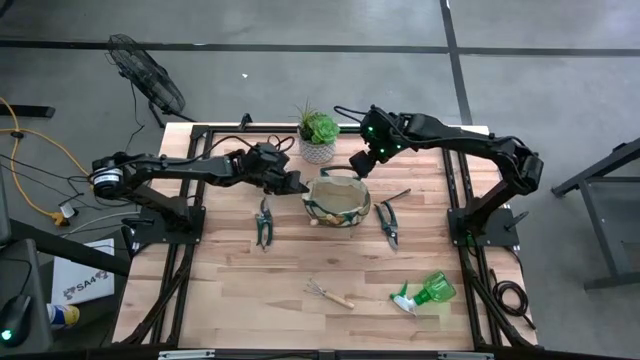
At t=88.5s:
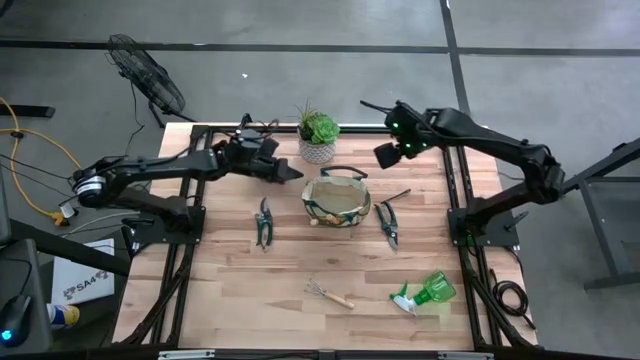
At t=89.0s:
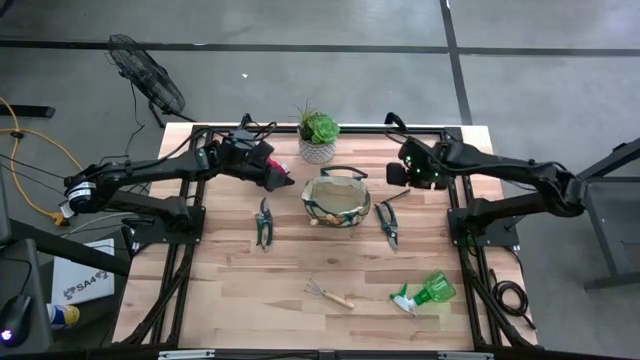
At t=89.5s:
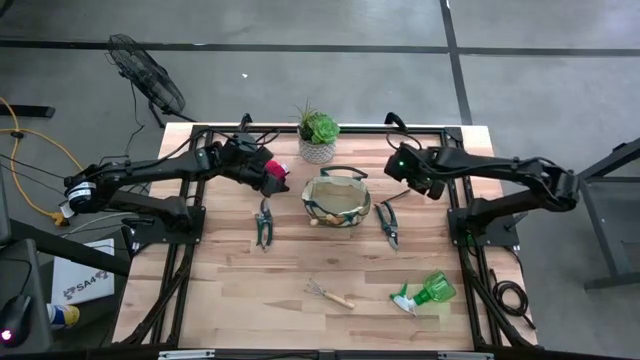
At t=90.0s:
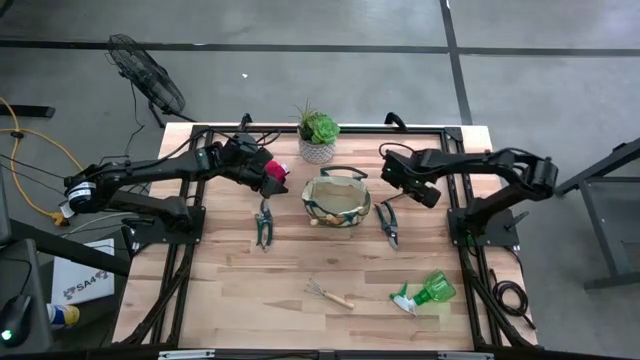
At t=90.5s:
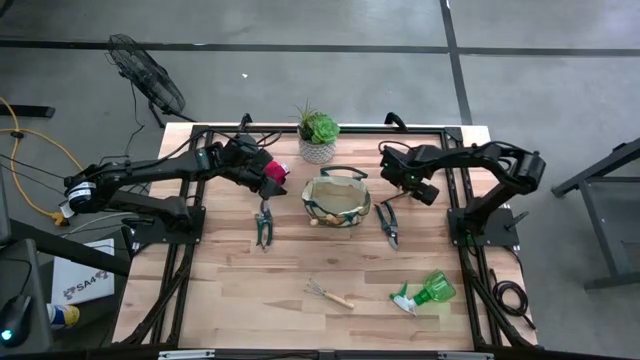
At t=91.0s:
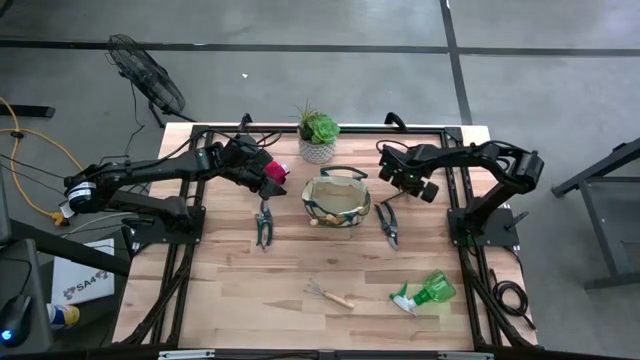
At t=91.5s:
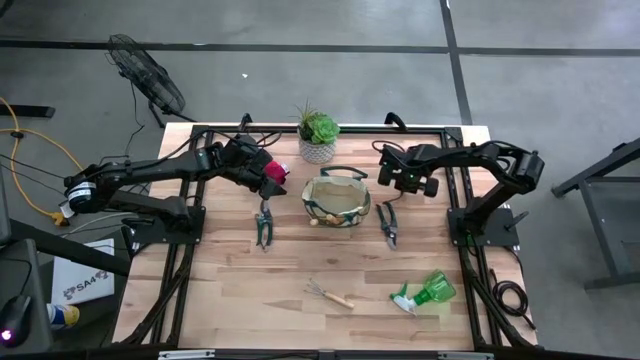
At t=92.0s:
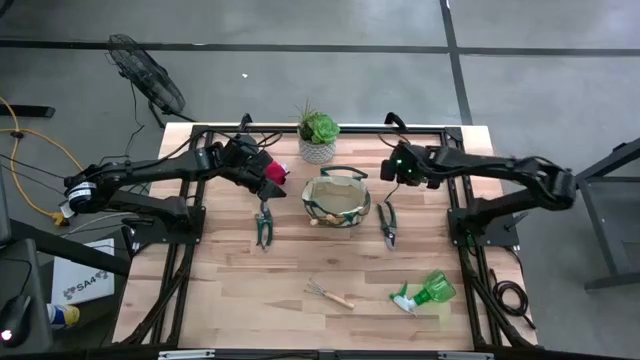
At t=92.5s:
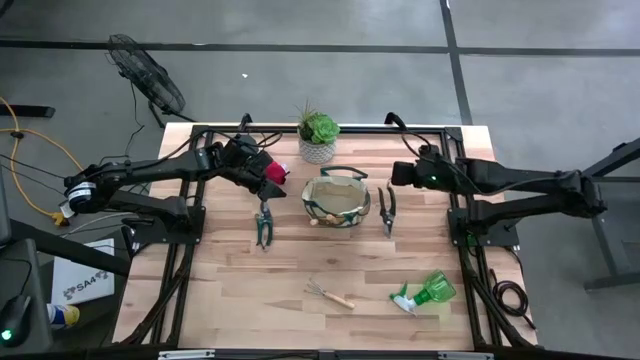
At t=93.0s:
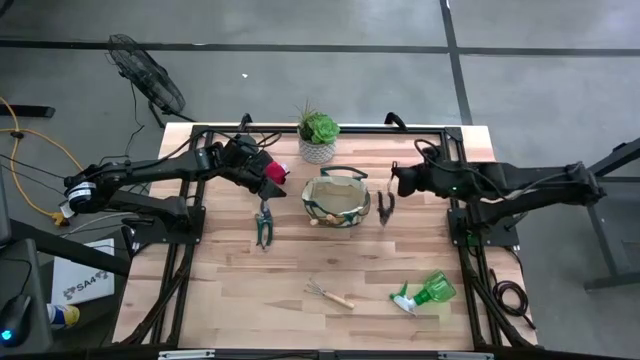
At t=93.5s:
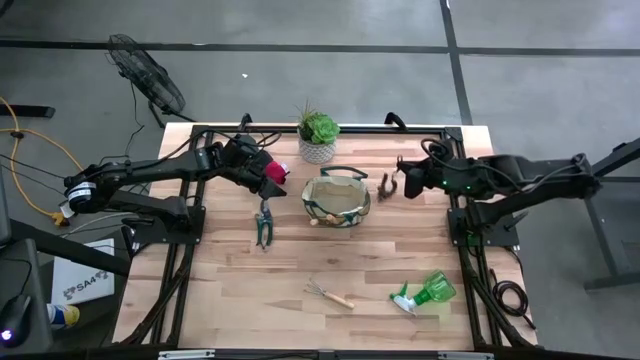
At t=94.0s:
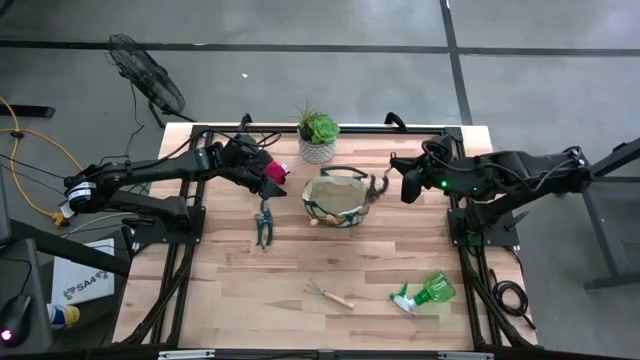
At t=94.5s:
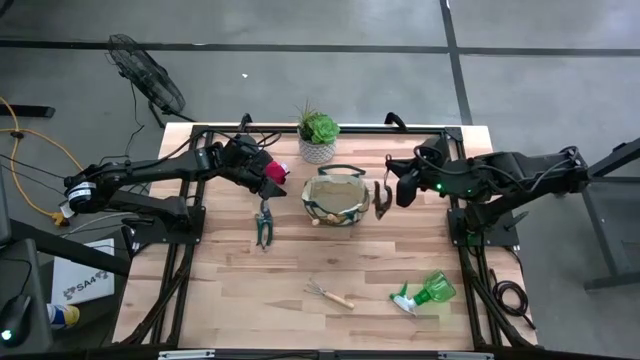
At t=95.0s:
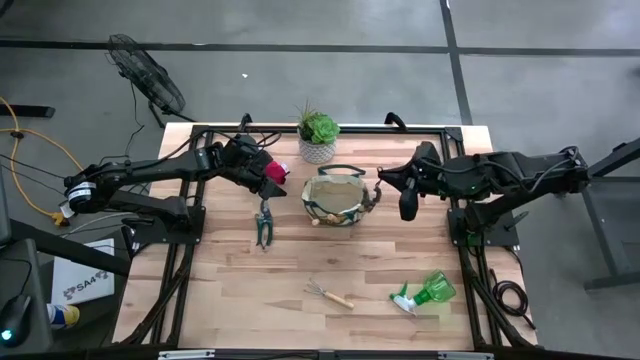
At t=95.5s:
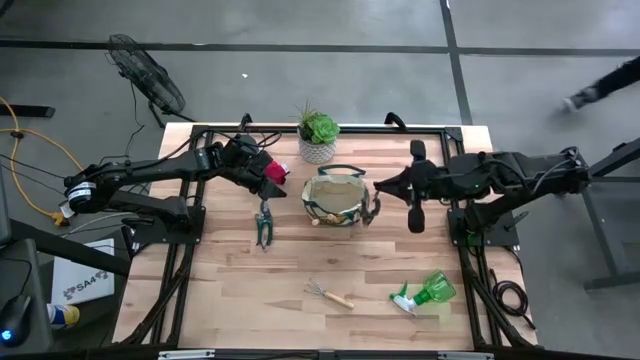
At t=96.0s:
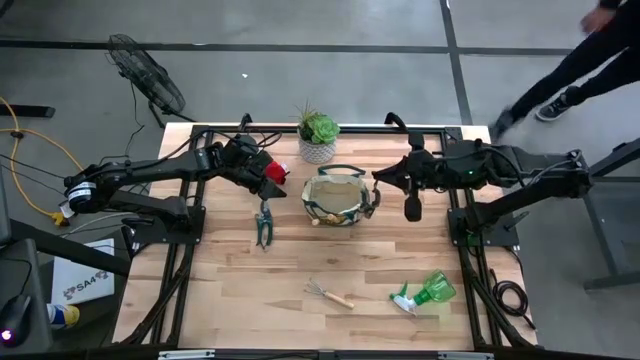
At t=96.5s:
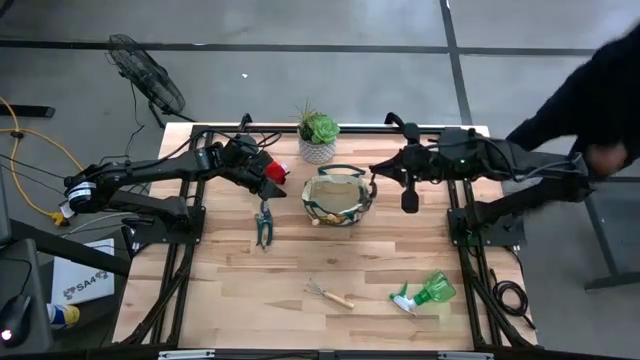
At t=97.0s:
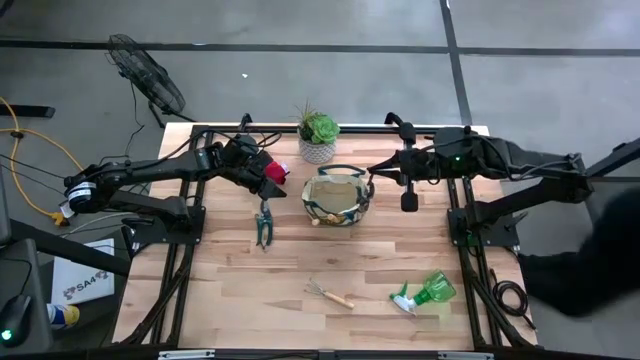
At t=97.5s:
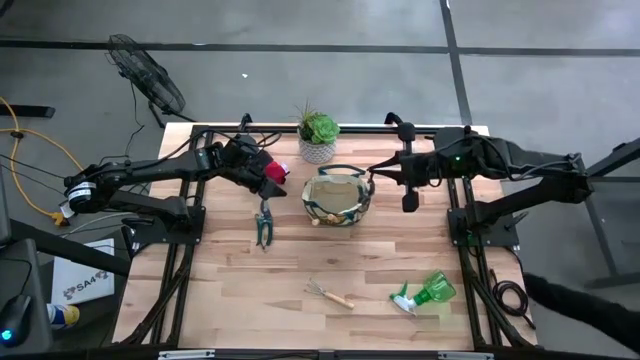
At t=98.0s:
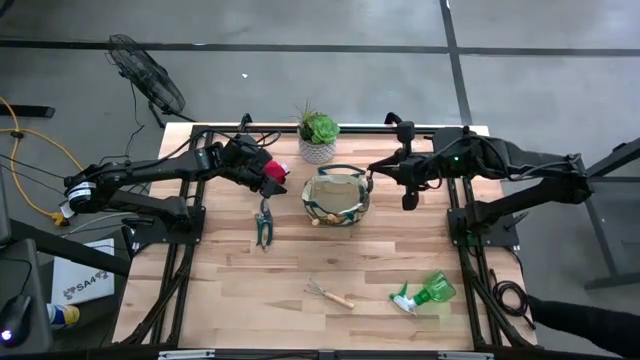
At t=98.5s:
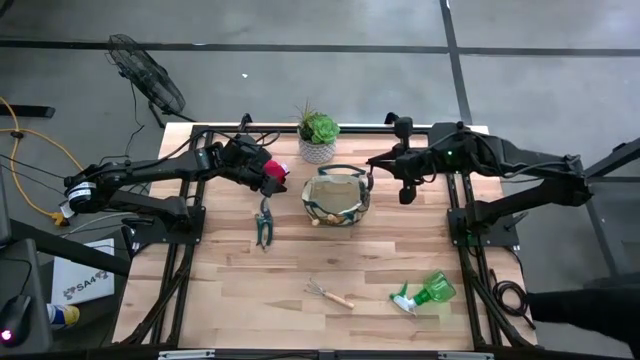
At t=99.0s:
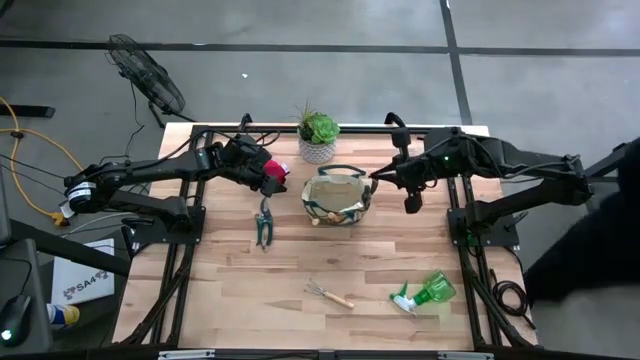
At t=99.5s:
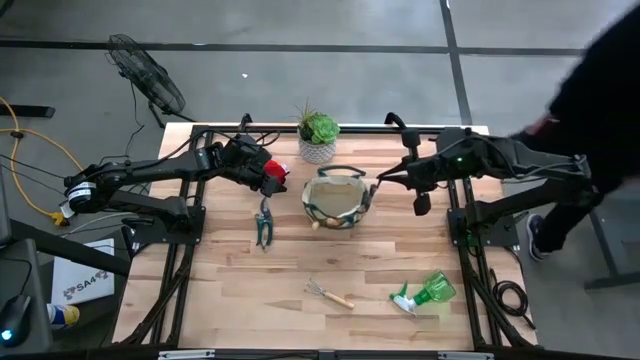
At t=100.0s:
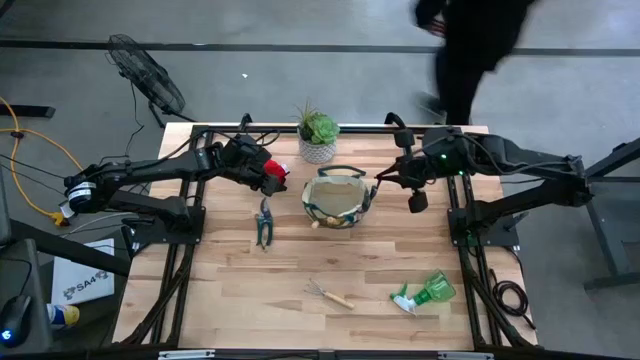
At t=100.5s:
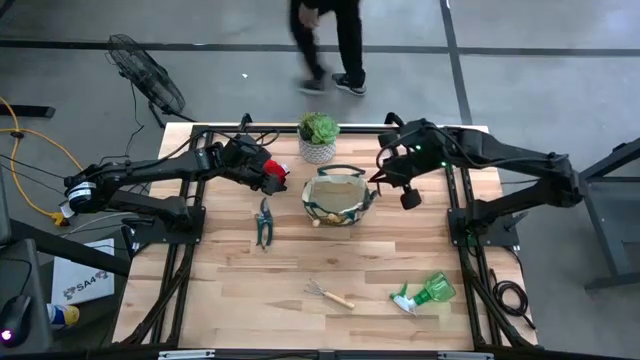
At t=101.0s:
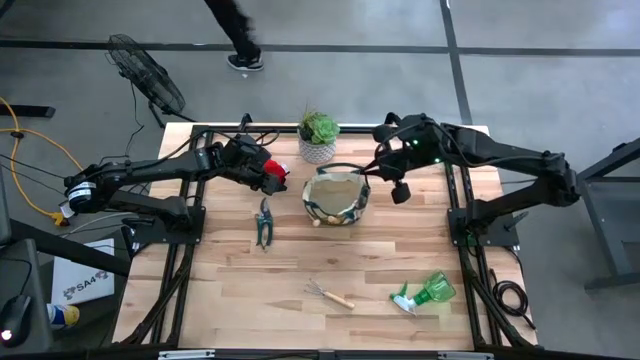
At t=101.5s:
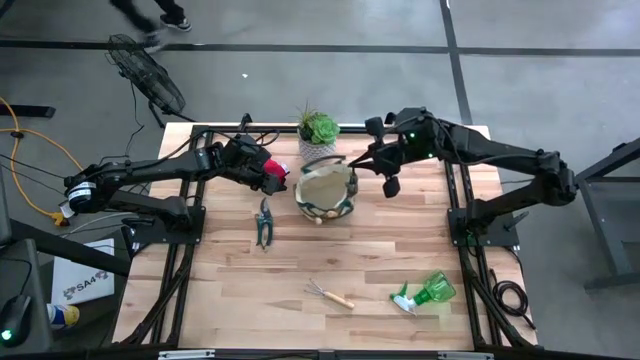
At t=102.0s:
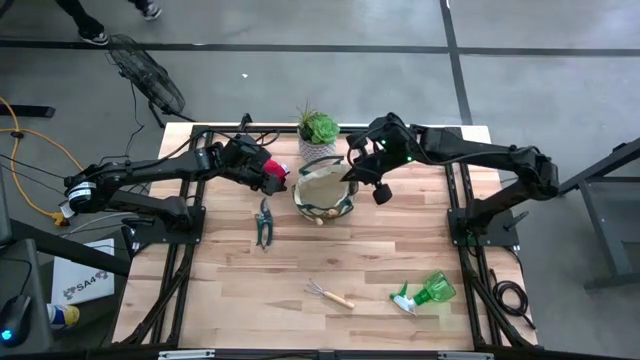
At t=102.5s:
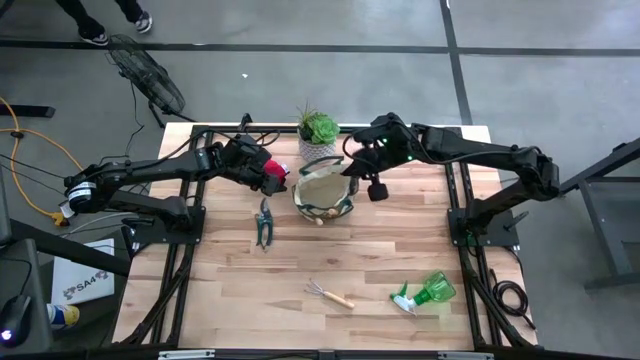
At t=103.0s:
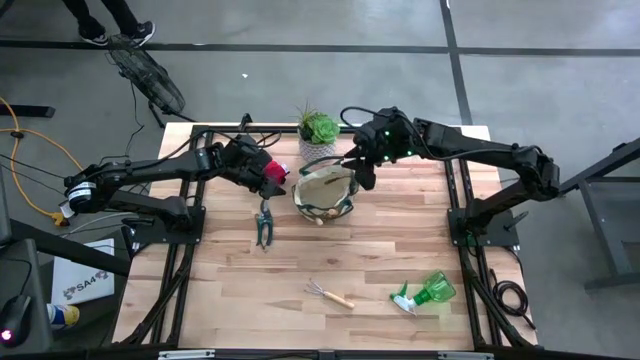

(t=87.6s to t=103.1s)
Task: Pick & Place Garden tools in Gardening bag
Put the bottom green shear scissor into the gardening bag

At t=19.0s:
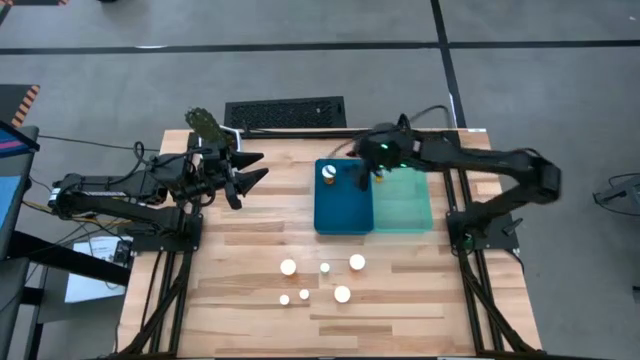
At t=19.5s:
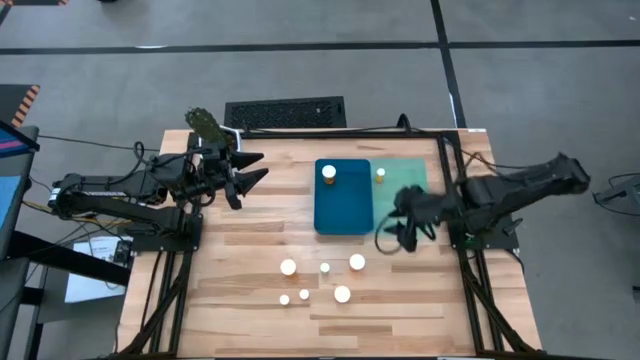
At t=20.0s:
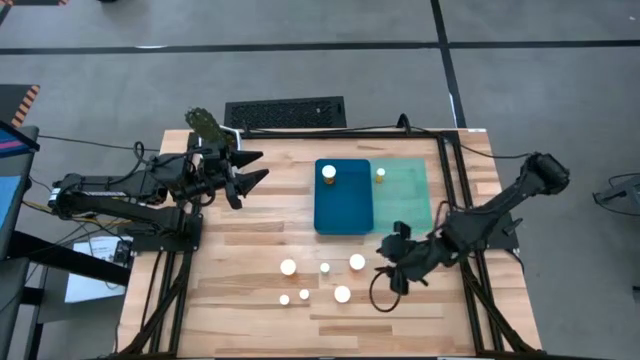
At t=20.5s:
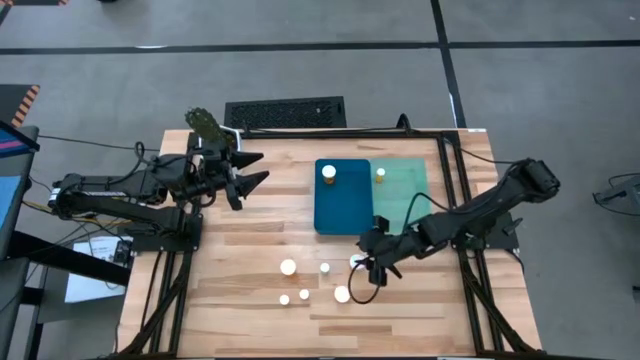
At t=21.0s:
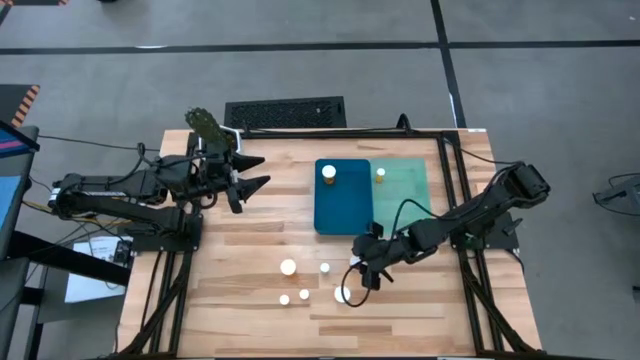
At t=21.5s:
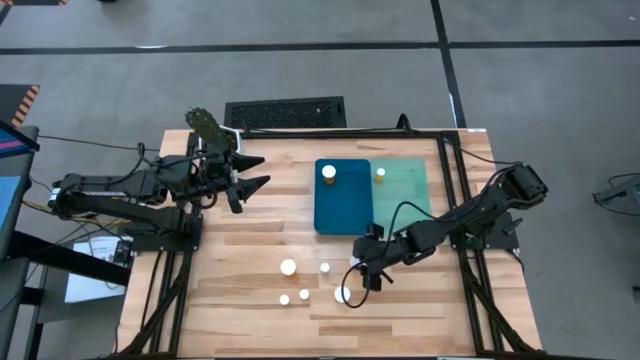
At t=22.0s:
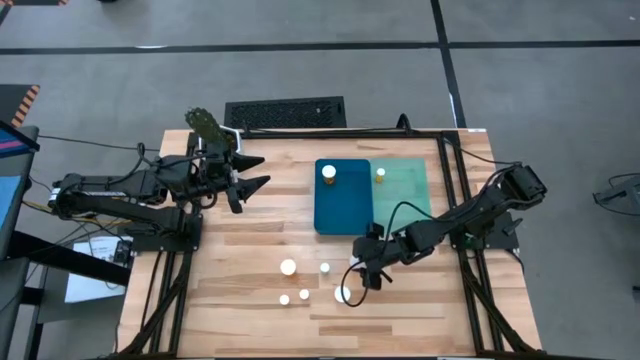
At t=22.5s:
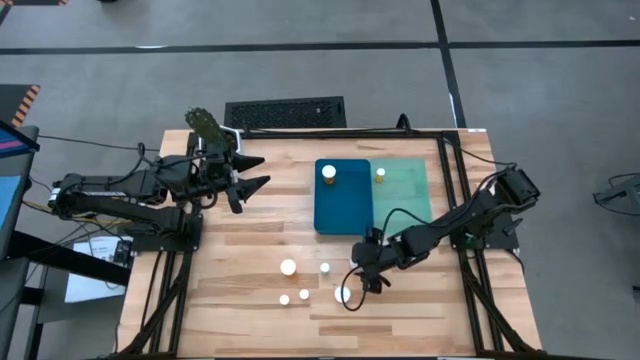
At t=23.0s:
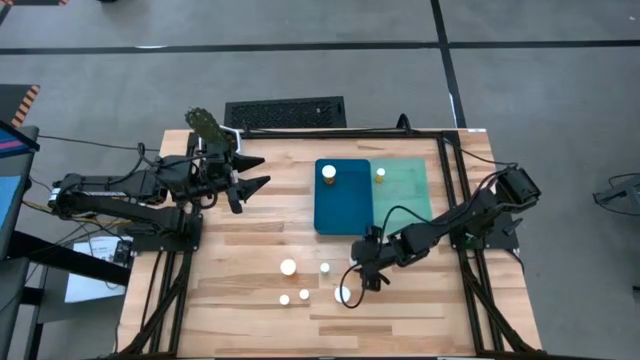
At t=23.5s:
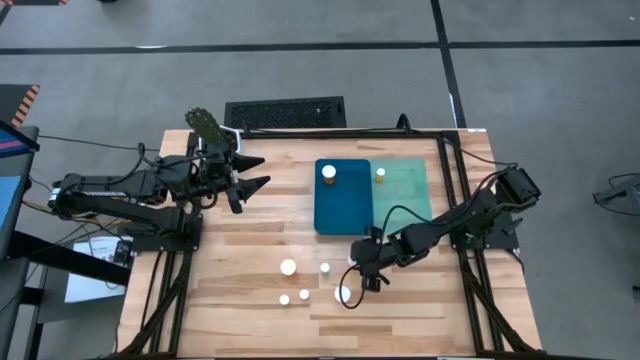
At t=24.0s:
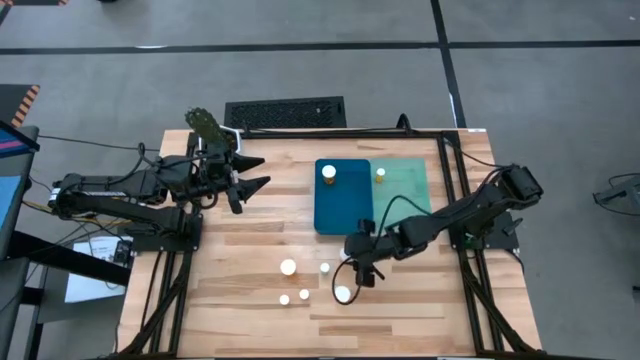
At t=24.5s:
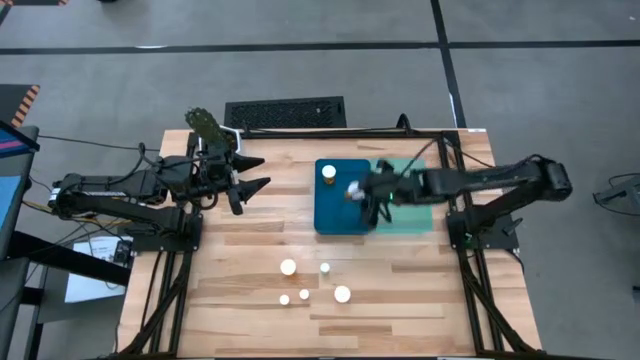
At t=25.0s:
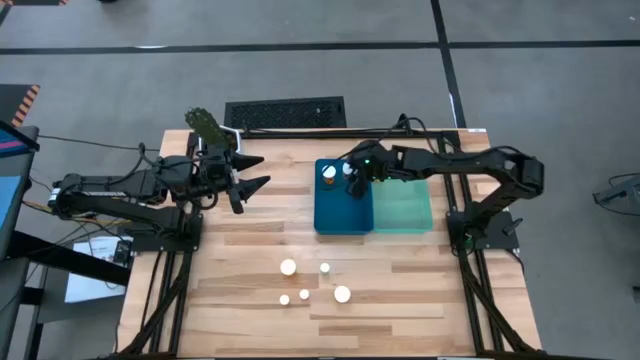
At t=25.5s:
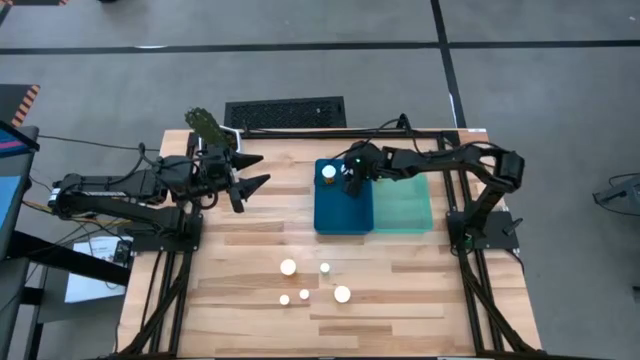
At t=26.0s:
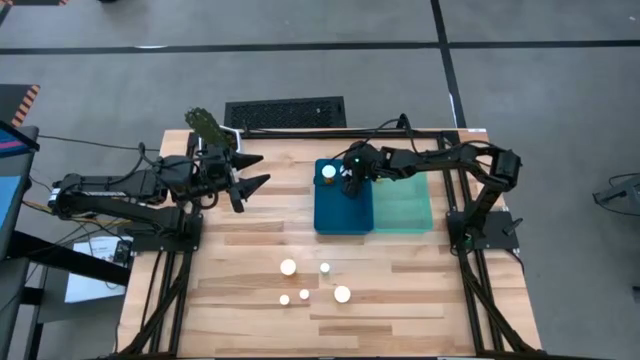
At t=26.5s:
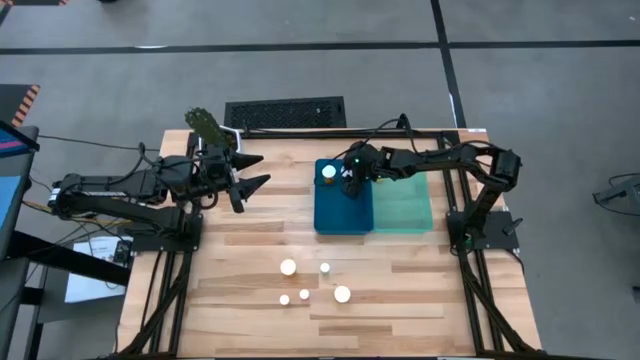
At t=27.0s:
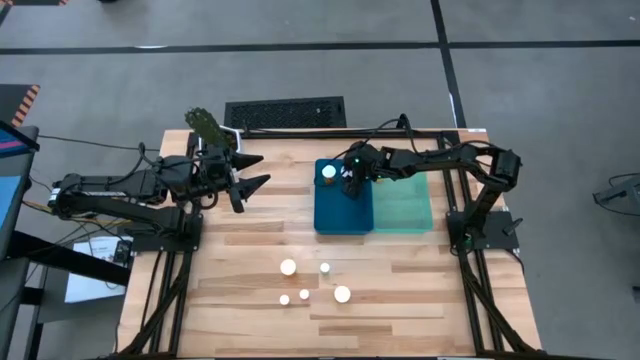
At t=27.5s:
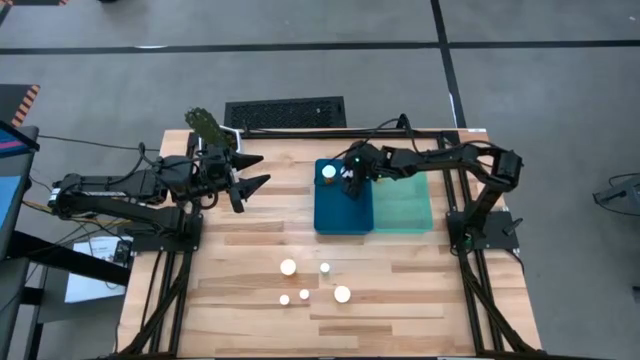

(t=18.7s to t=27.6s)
Task: Pick and place medicine bottles into bin by pill shape (circle, oval)
Put the large orange pill bottle into the blue bin
